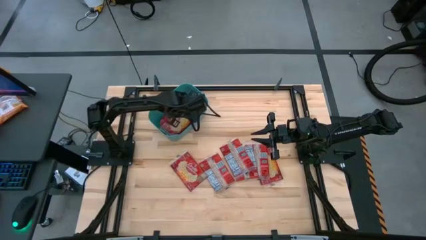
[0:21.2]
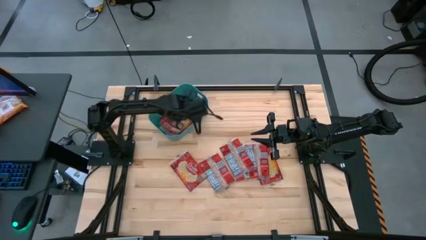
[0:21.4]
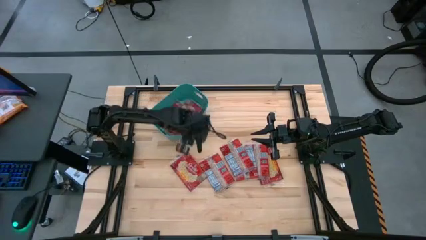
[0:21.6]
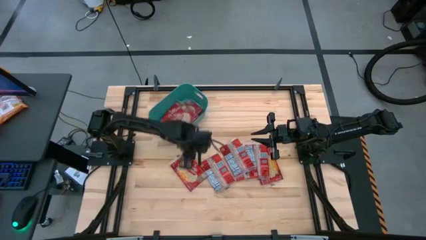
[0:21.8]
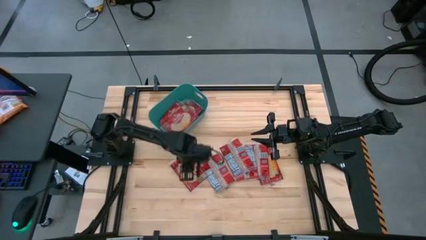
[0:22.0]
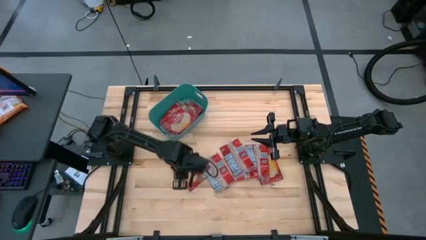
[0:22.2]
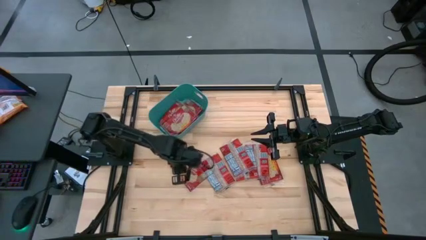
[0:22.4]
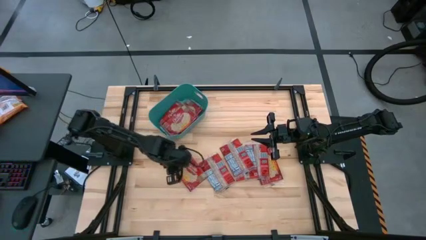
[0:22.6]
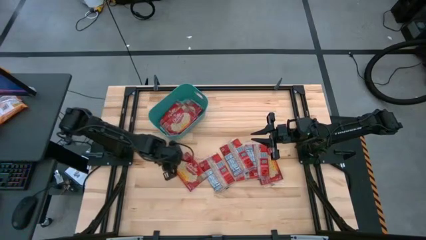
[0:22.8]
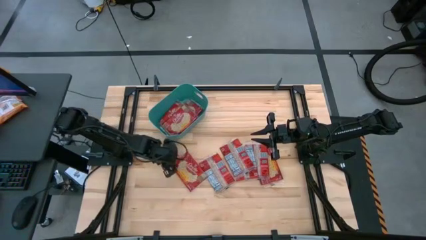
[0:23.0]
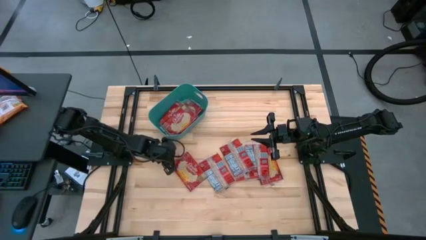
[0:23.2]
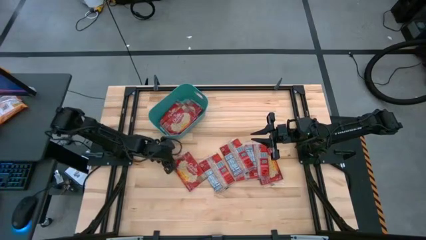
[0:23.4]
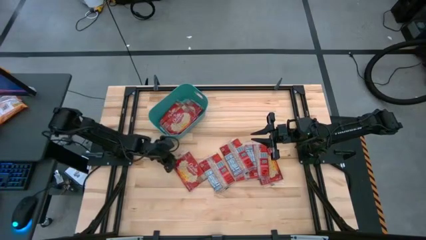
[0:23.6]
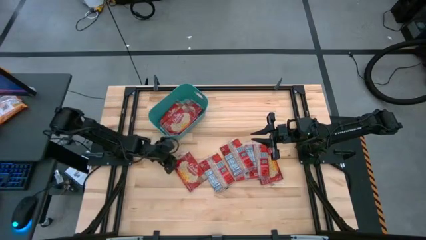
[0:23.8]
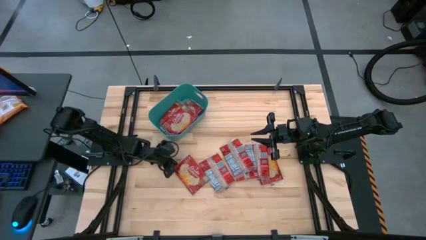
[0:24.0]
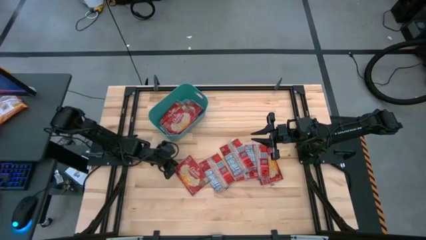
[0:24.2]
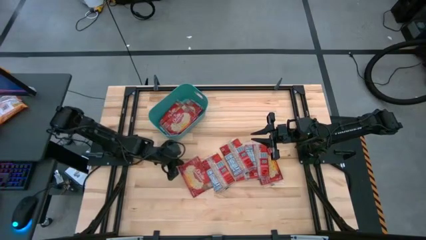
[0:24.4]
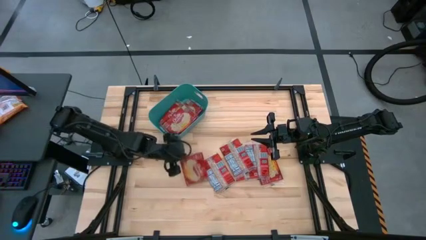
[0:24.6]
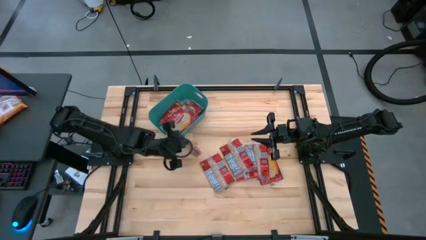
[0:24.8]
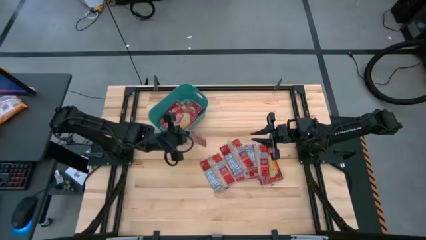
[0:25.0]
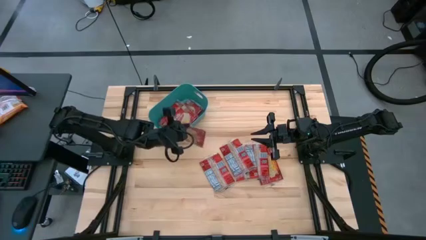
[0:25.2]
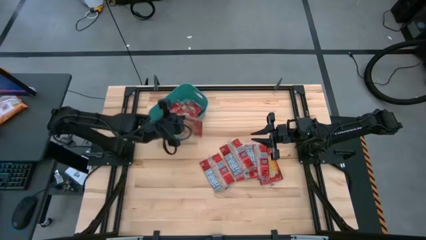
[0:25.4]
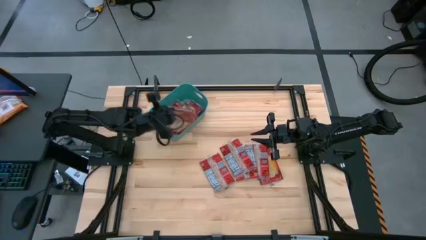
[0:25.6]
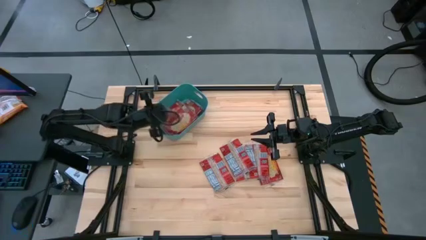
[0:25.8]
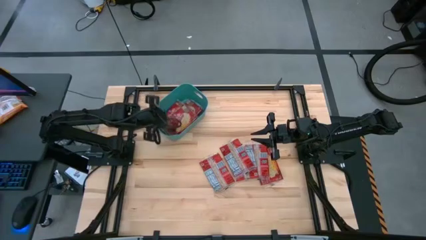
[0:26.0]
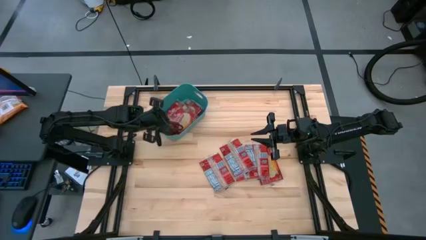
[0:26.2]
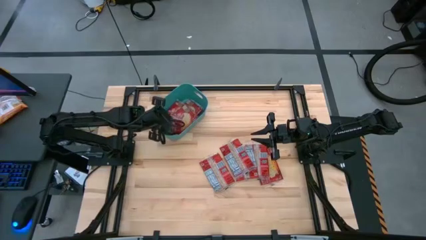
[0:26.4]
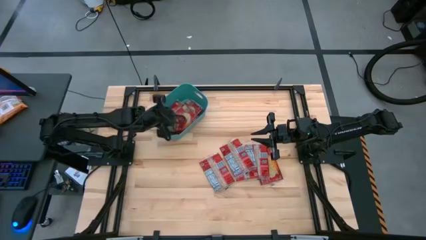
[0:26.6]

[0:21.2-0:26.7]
Task: Sort popcorn bags into baskets
Put the red popcorn bag into the blue bin

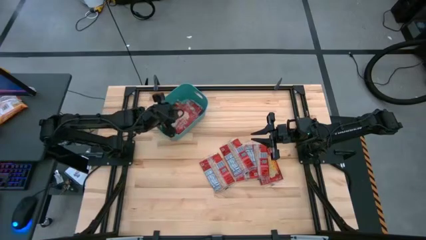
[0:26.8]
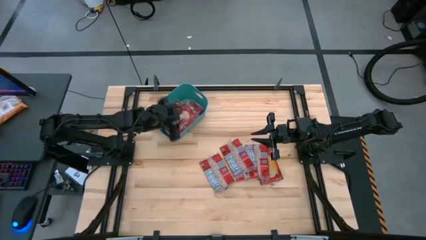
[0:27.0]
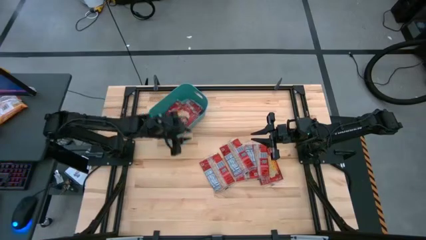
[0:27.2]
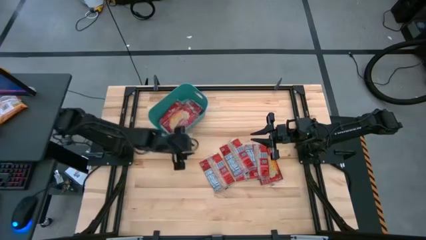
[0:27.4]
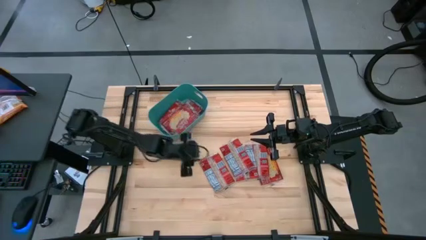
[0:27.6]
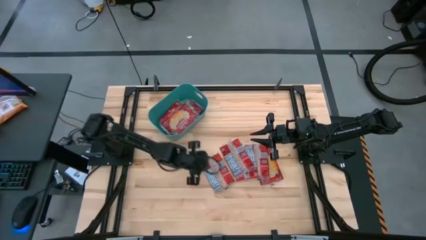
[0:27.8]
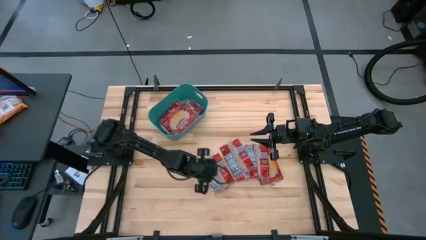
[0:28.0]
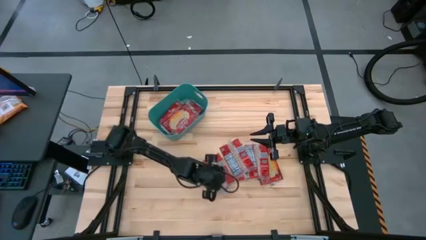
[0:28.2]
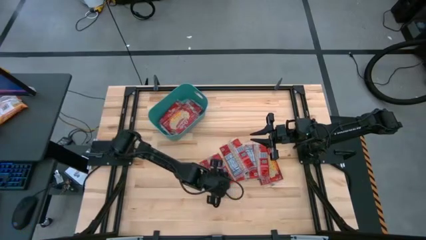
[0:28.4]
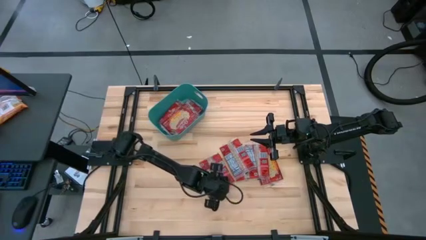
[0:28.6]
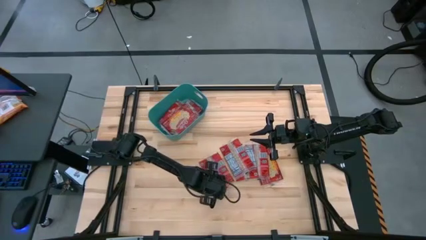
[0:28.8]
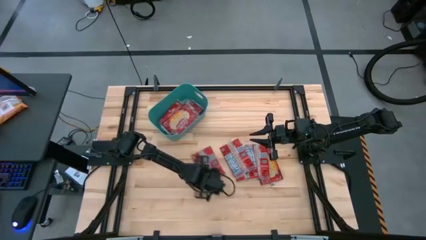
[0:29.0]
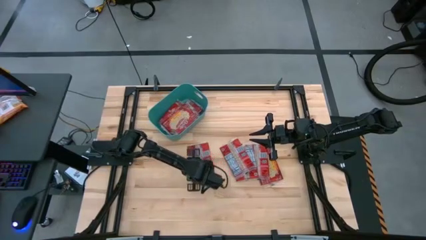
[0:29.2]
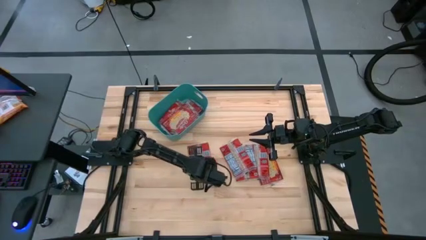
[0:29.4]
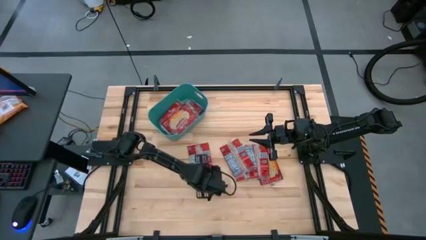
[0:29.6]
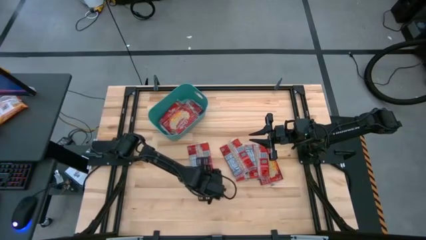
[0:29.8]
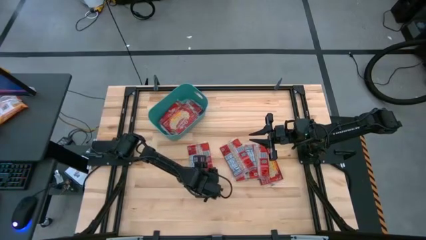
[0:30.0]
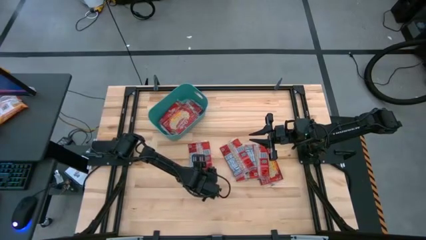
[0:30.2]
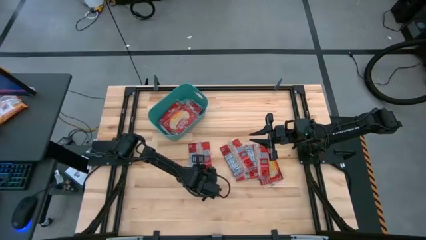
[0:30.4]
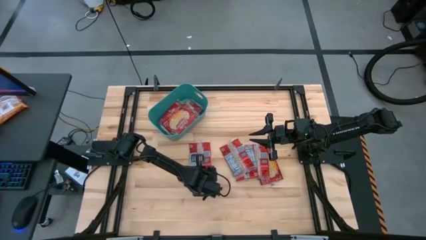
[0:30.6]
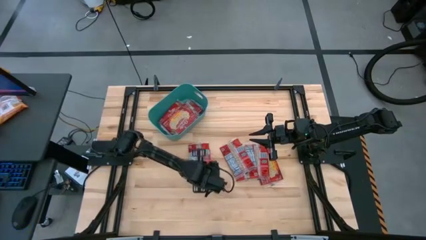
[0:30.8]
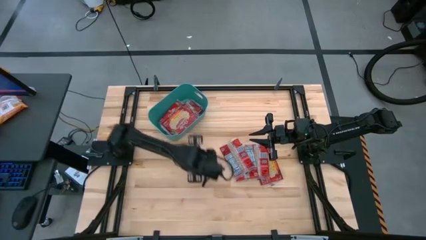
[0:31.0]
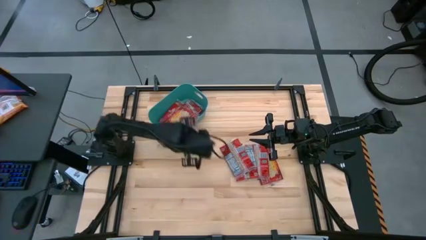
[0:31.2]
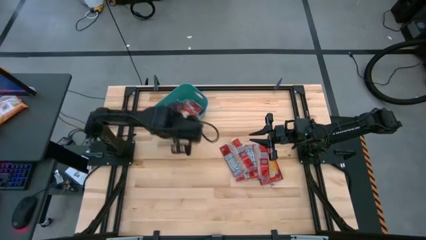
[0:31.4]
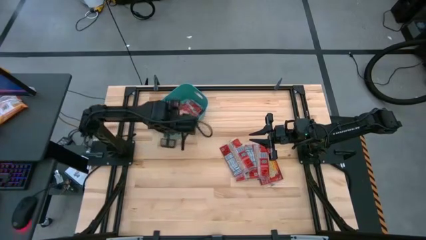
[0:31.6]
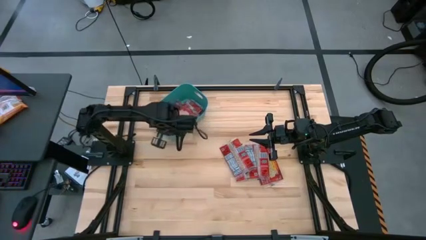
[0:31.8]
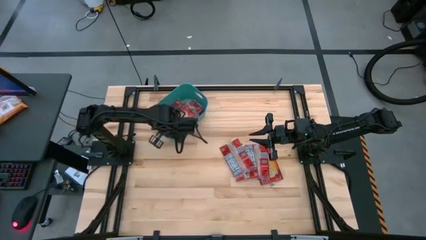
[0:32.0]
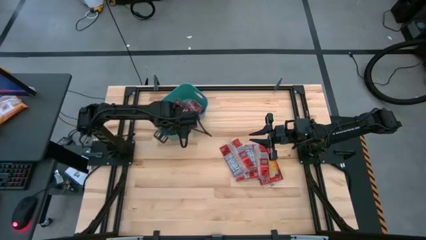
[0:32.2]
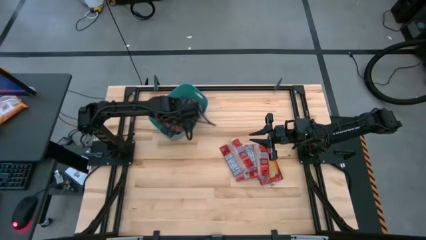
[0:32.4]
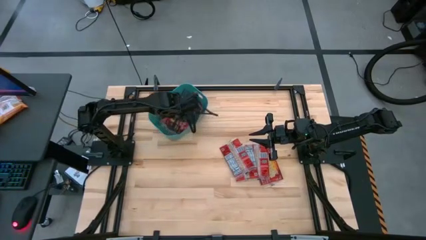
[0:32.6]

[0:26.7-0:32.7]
Put the red popcorn bag into the blue bin

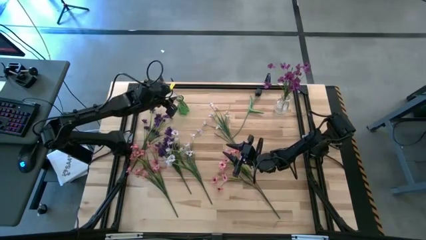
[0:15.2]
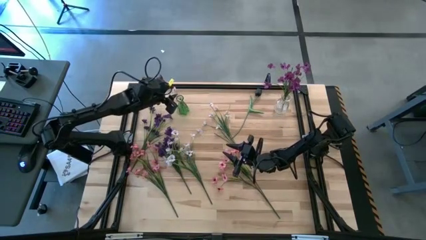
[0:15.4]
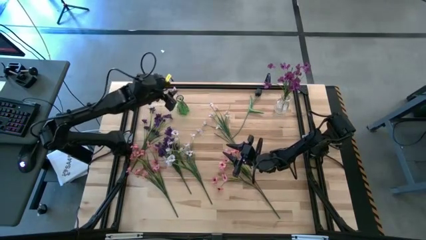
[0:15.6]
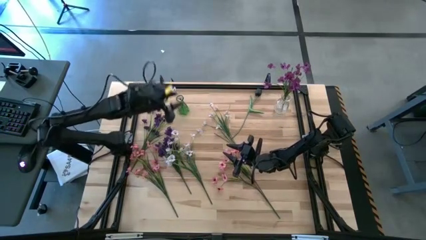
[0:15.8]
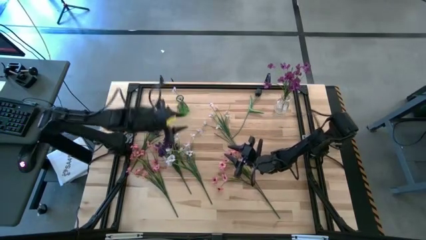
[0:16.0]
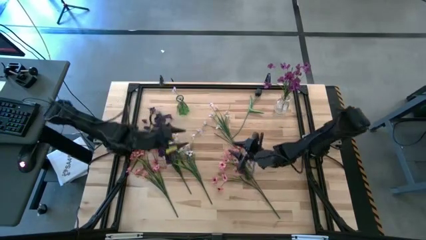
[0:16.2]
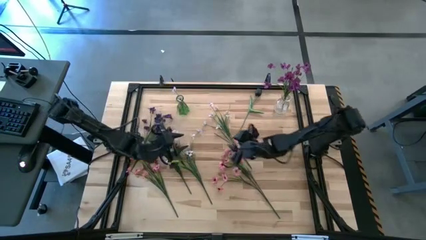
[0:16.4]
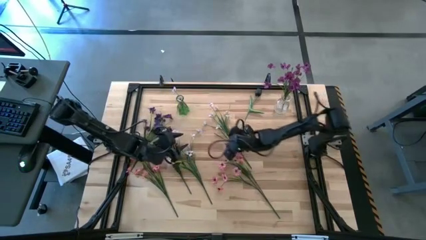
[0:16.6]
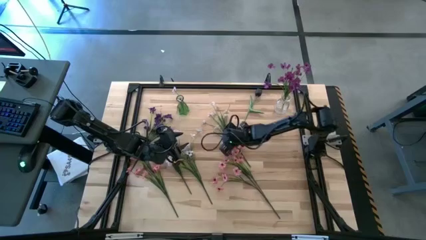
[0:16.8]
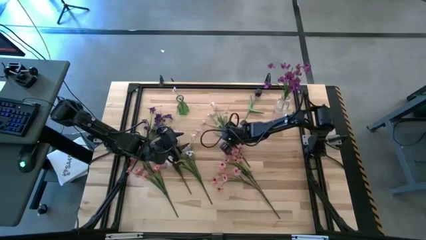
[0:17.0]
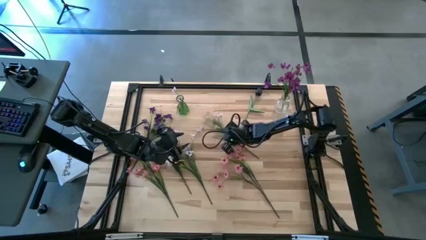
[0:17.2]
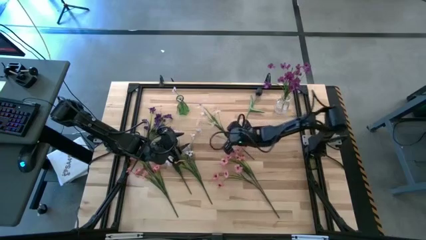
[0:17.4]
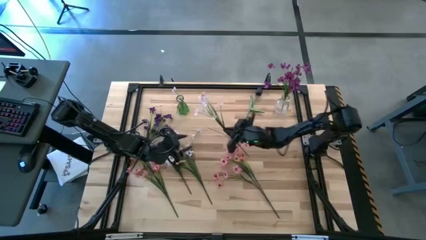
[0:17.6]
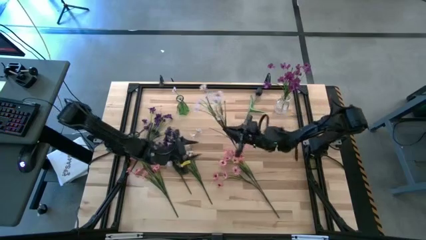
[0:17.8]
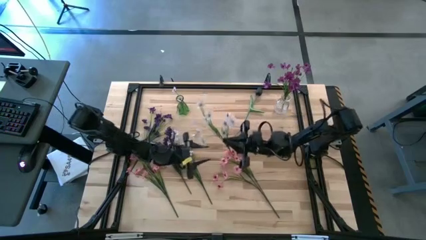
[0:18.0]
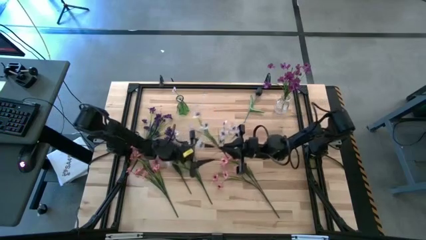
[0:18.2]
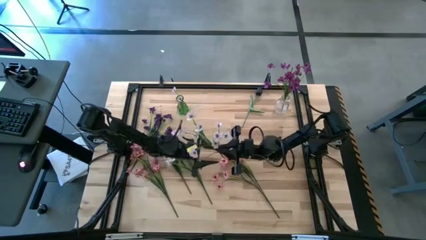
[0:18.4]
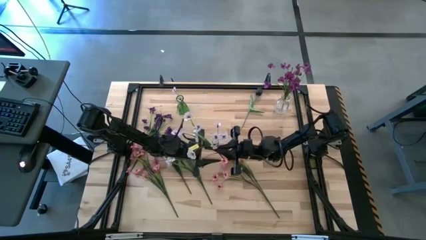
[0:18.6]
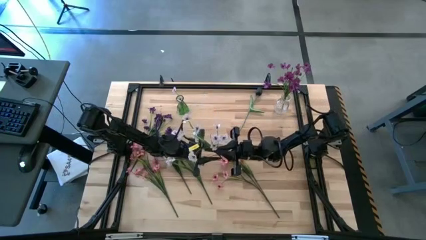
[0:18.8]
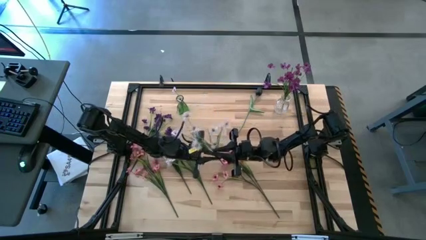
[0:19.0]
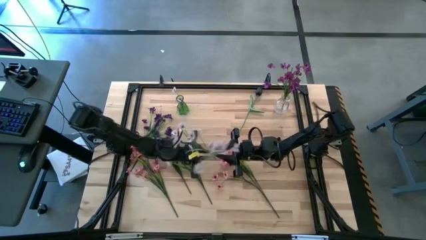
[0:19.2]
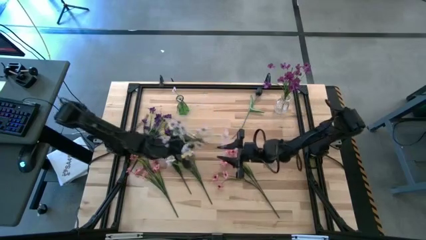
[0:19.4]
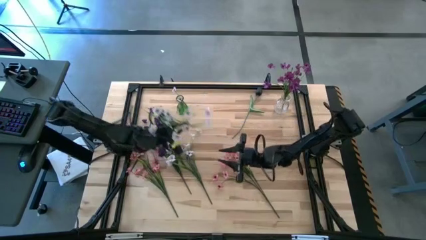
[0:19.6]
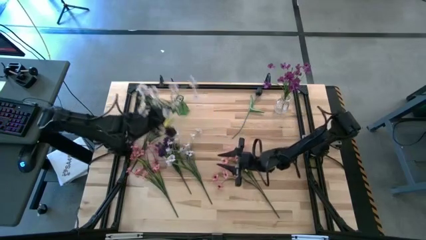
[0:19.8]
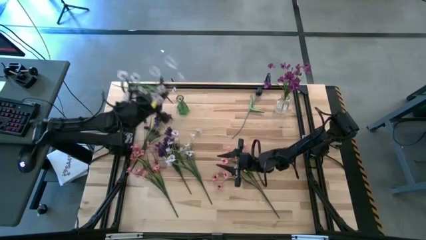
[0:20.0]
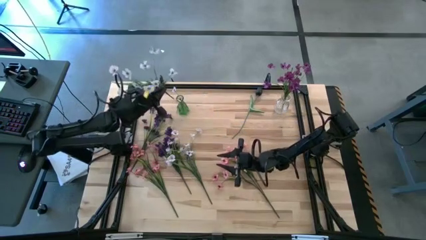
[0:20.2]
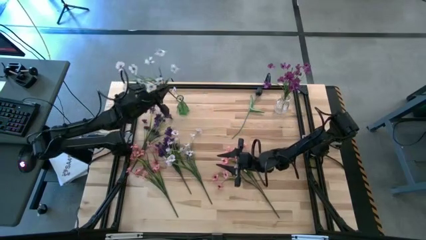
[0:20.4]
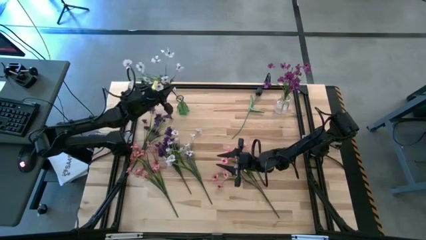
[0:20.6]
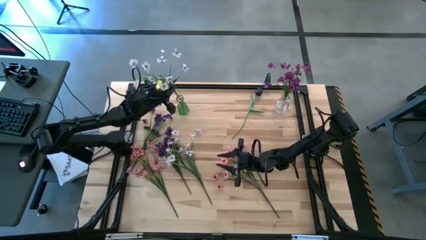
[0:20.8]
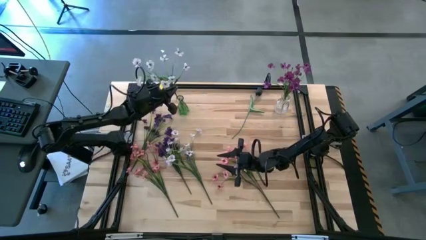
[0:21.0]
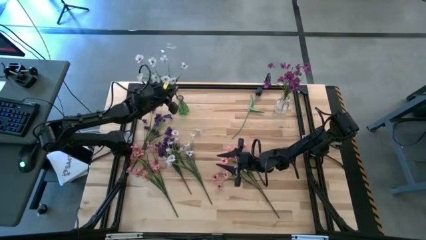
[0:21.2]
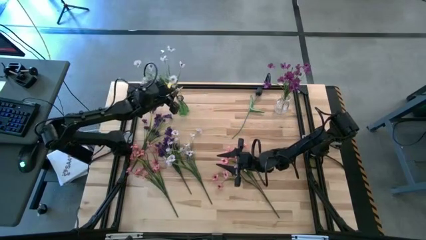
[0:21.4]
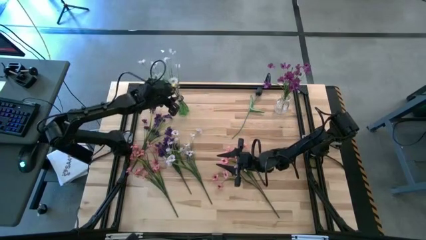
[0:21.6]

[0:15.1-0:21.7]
Task: Sort flowers into vase by color
Put the top white flowers into the green vase
